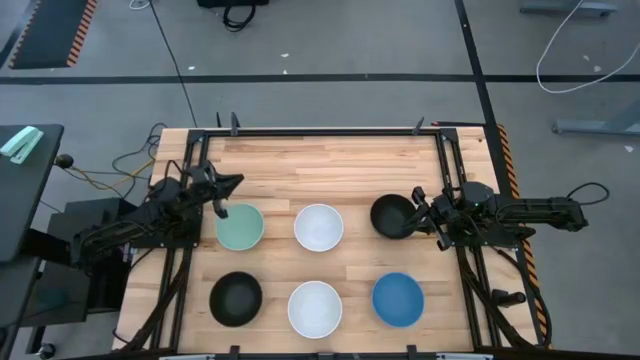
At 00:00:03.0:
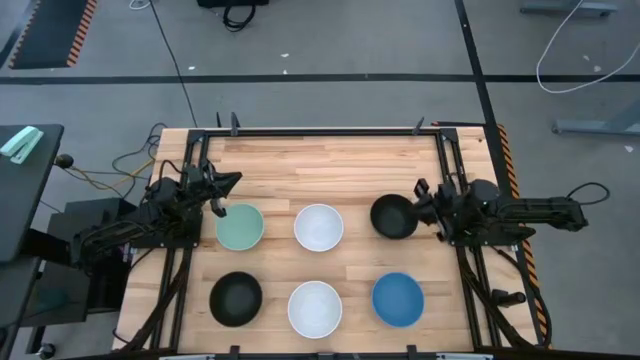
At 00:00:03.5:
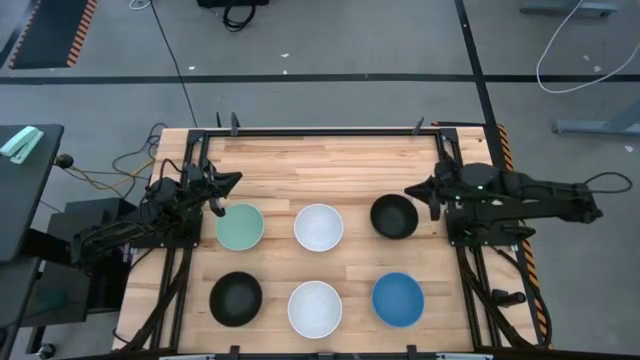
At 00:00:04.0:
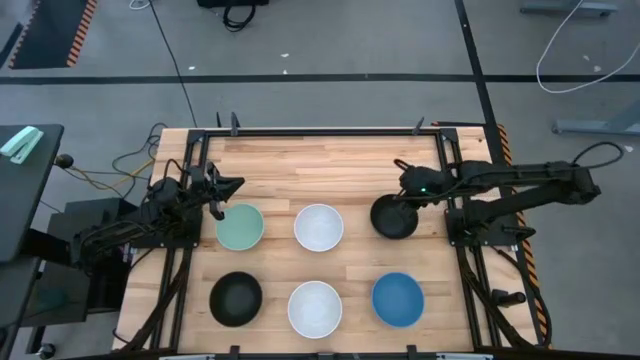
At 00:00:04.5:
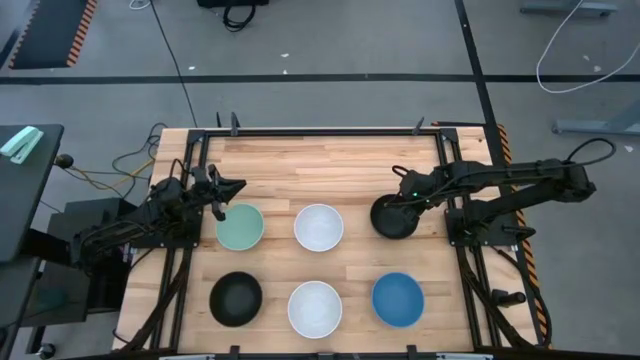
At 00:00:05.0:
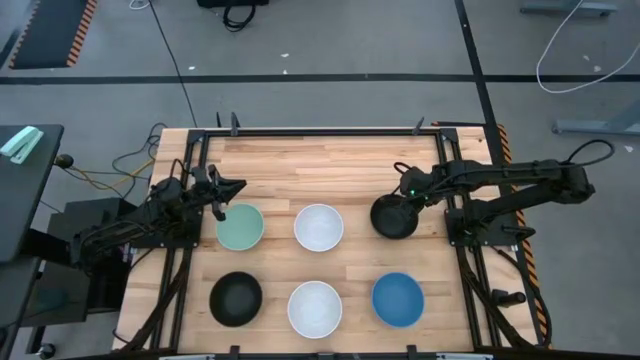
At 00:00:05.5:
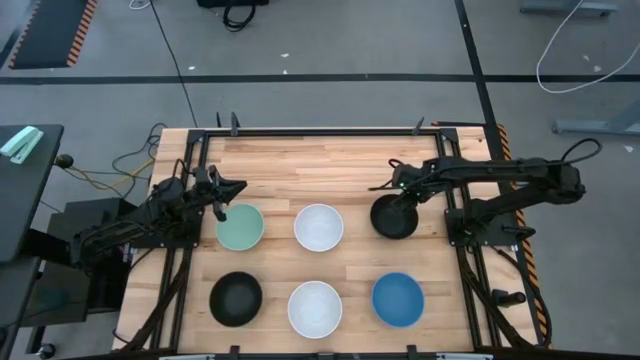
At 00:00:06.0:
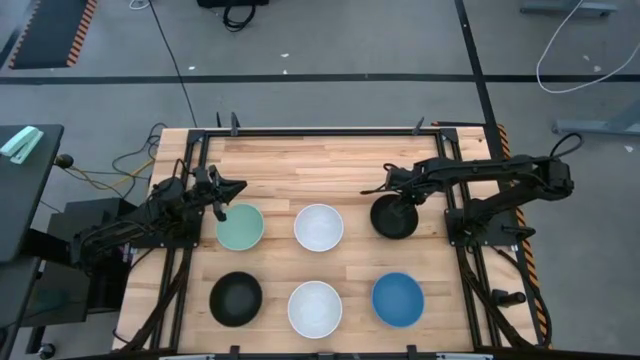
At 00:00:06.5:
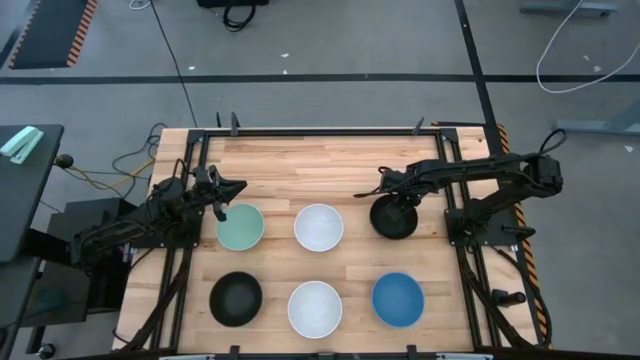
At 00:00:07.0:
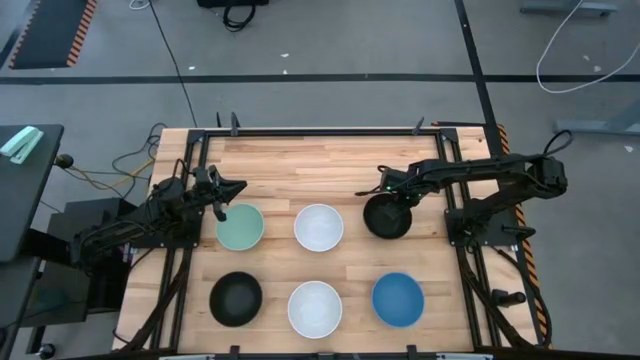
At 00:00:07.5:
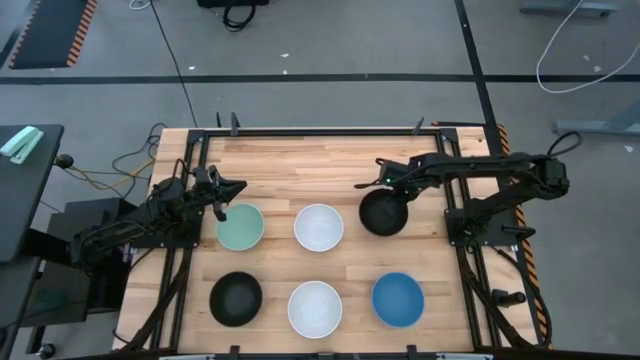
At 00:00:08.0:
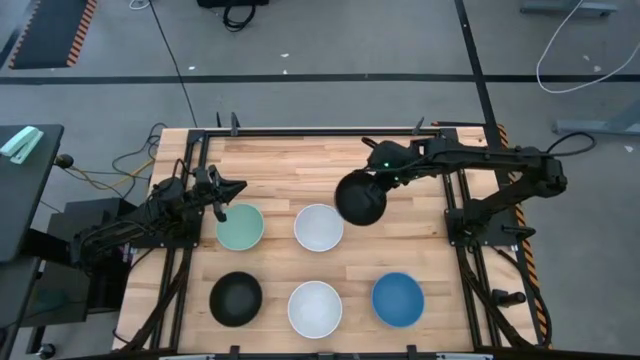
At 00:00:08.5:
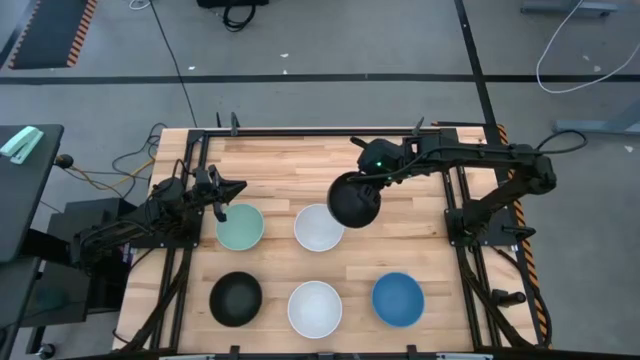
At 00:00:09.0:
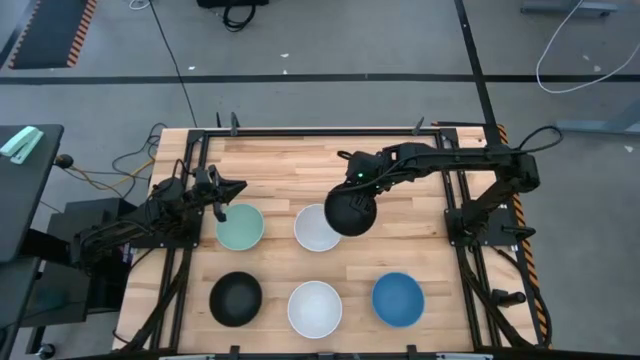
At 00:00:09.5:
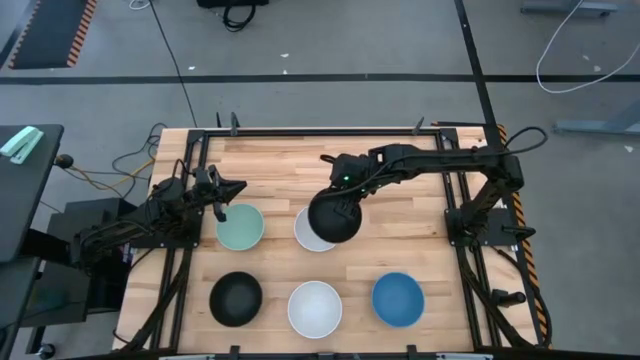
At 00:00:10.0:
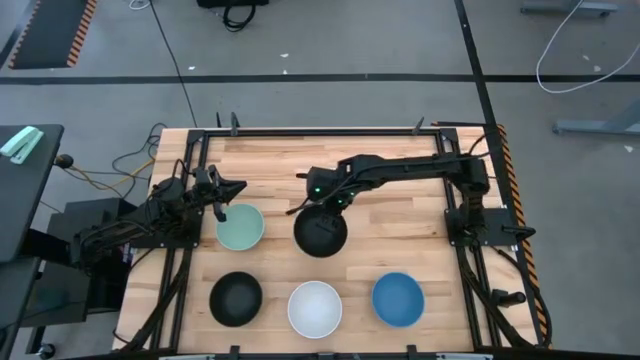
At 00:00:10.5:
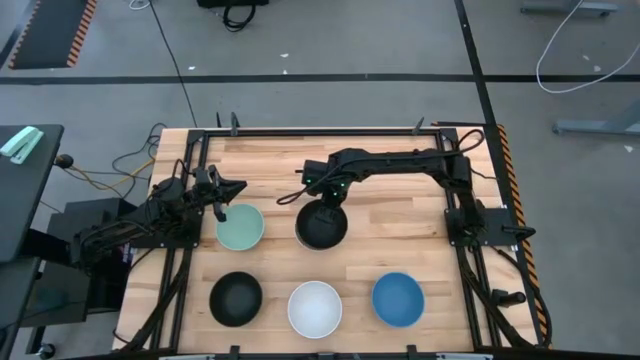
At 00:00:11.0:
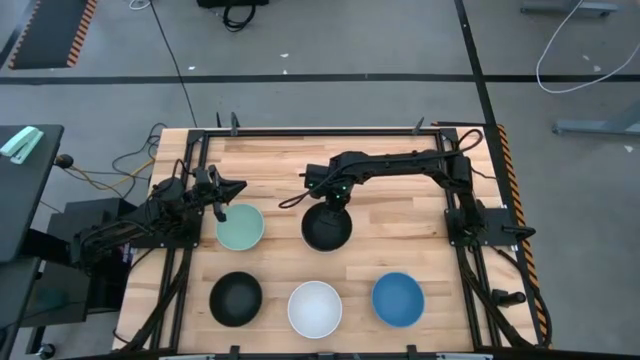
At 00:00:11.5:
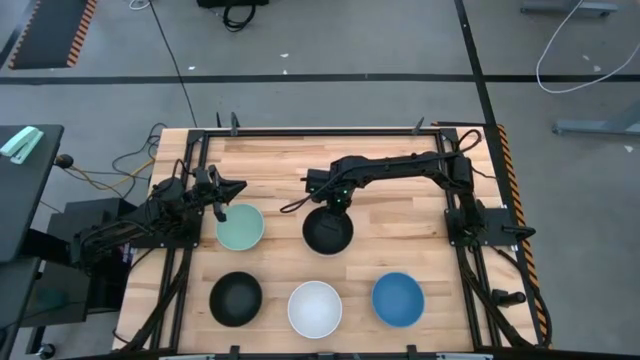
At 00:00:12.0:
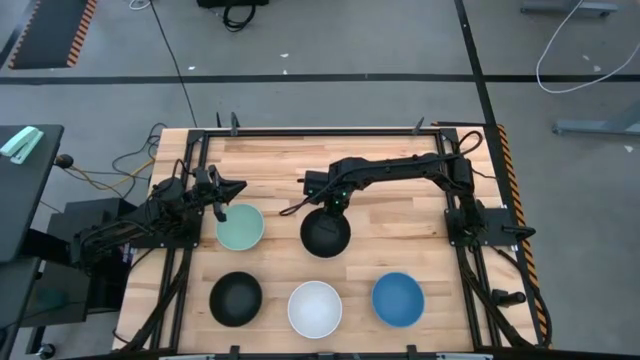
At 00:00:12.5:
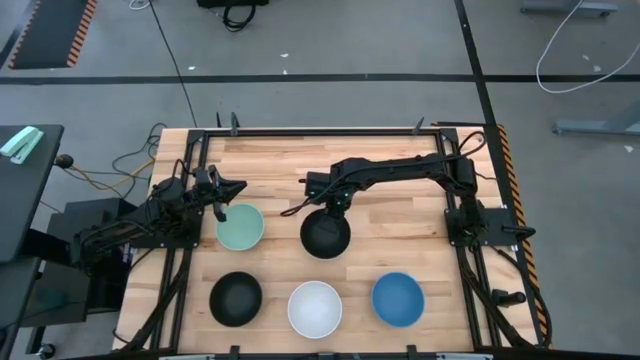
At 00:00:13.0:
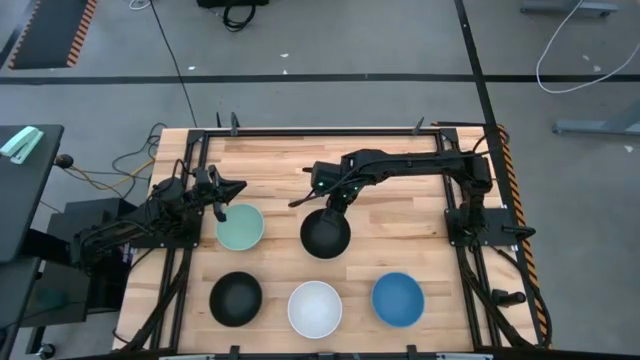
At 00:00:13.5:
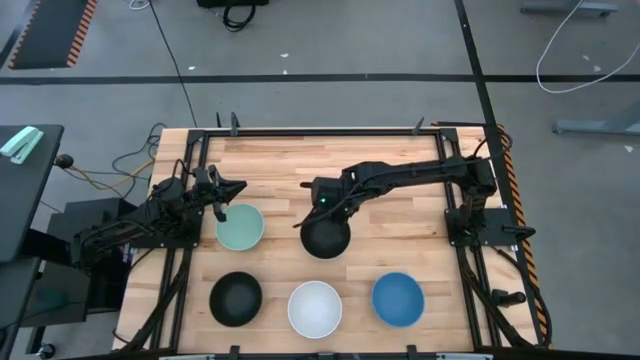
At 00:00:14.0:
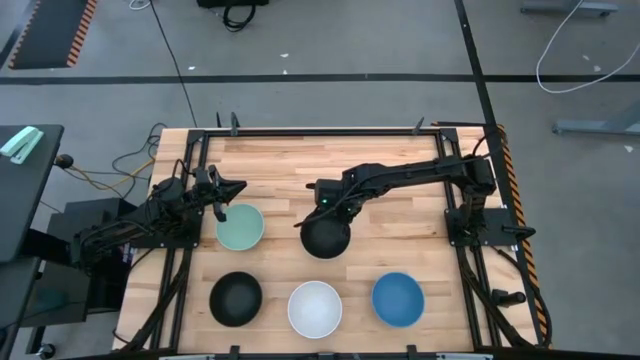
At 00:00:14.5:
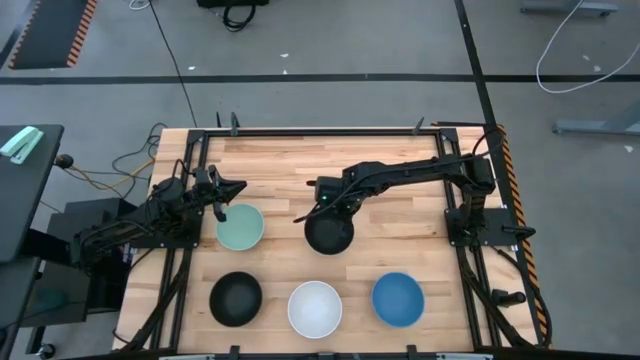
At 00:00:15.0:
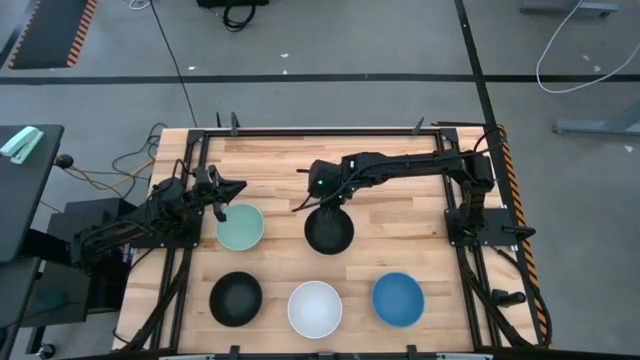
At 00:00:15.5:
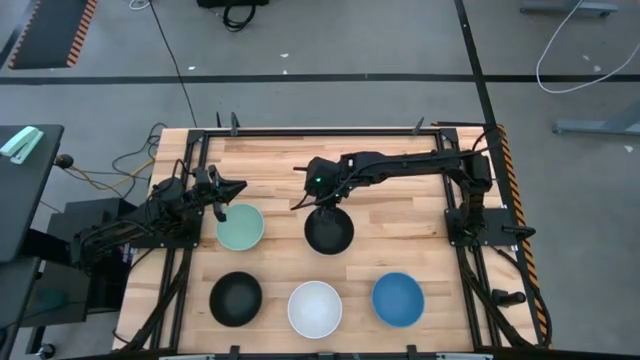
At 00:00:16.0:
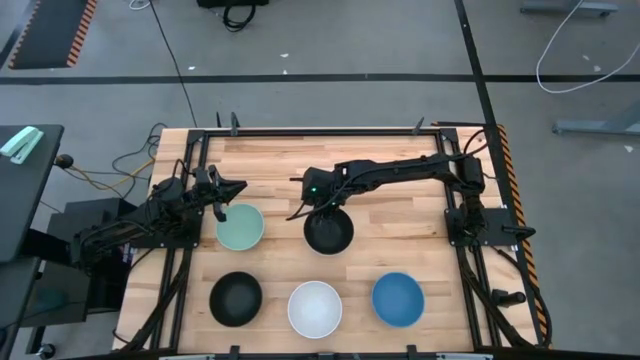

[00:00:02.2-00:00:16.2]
Task: Nest bowls inside each other
Stack the right black bowl on top of the top white bowl

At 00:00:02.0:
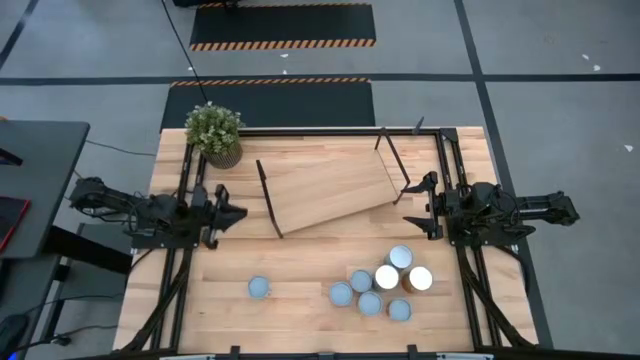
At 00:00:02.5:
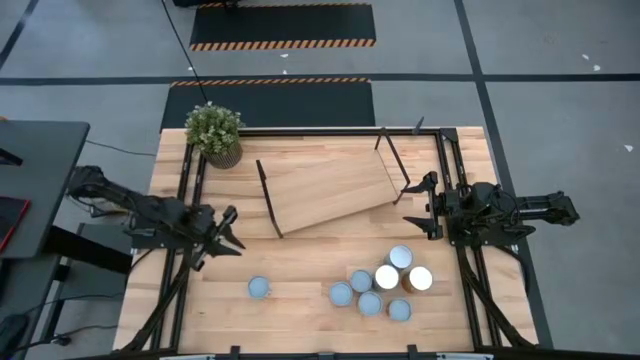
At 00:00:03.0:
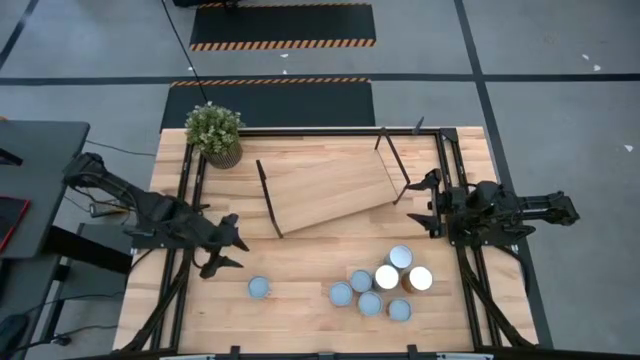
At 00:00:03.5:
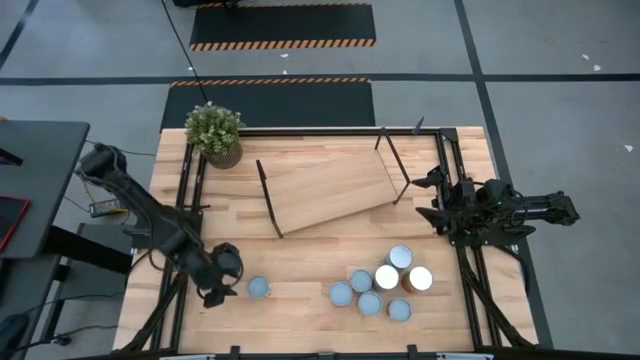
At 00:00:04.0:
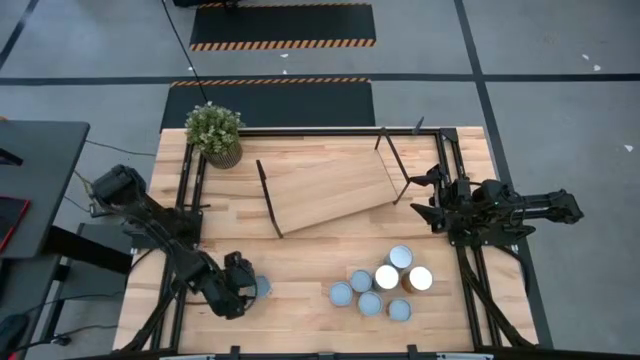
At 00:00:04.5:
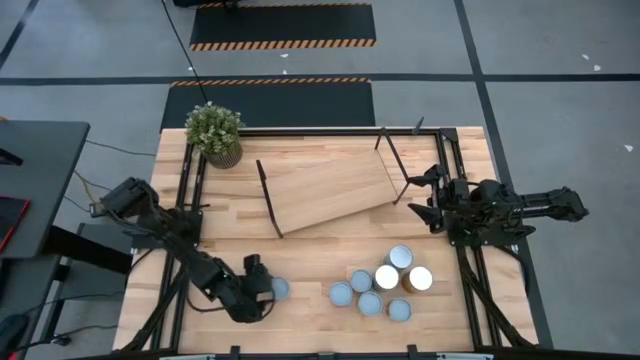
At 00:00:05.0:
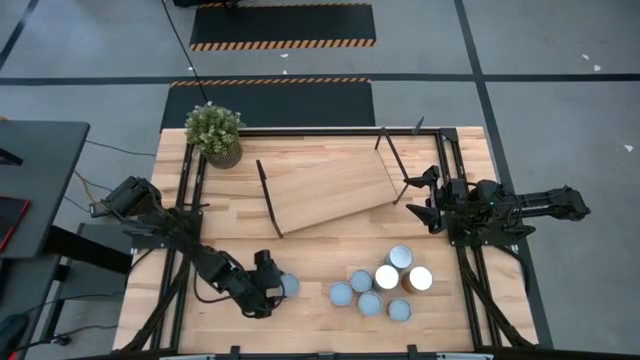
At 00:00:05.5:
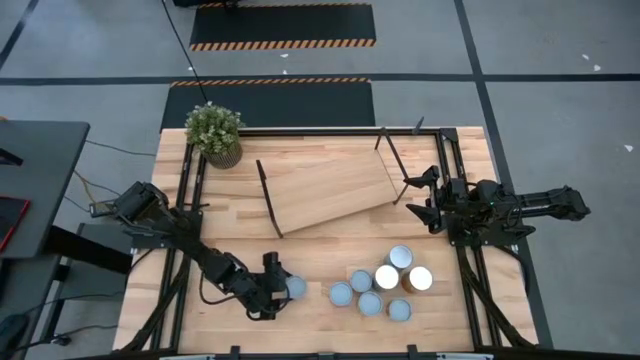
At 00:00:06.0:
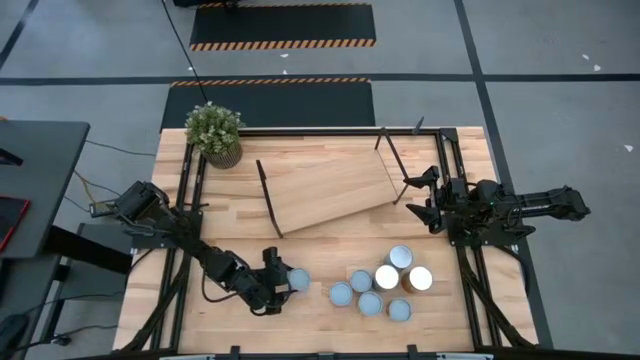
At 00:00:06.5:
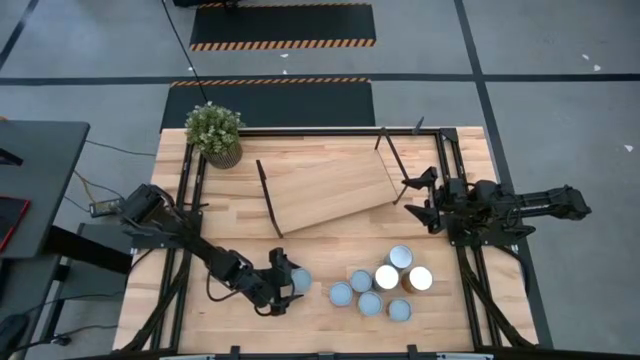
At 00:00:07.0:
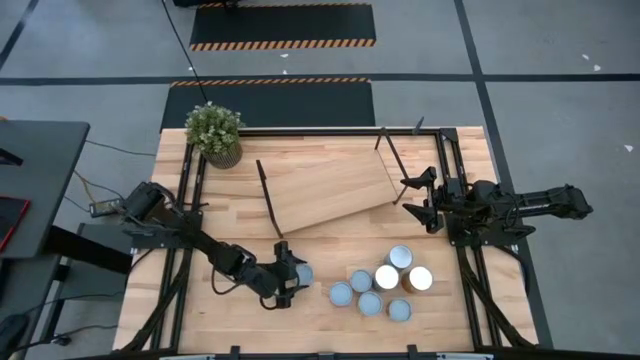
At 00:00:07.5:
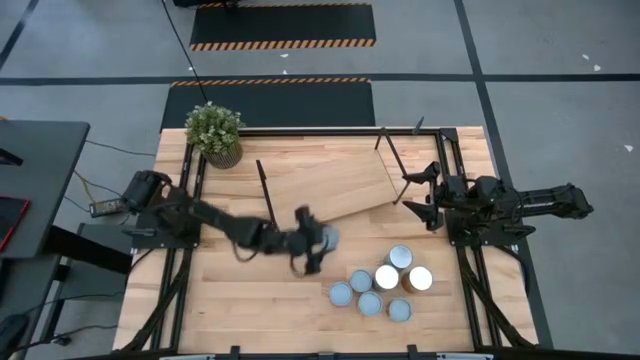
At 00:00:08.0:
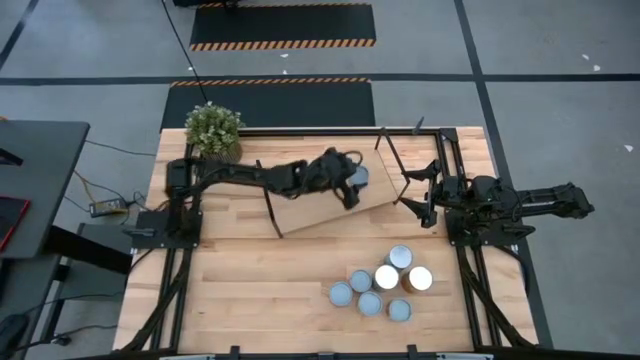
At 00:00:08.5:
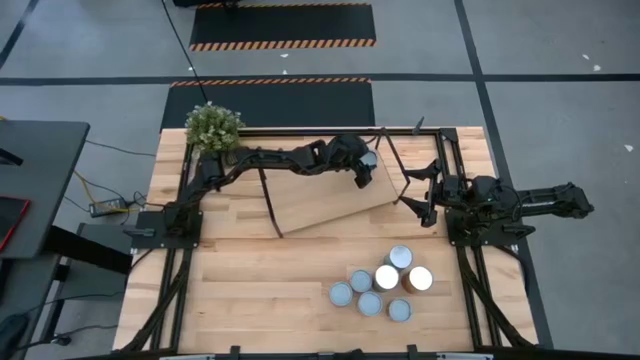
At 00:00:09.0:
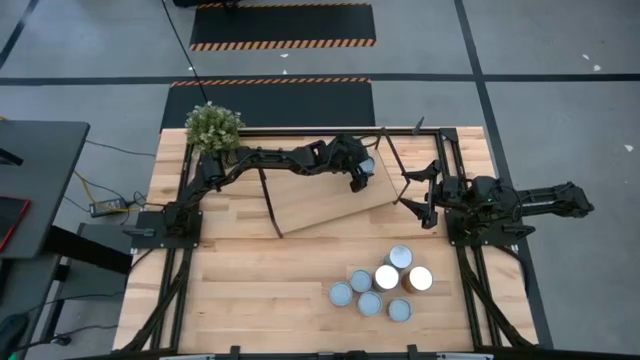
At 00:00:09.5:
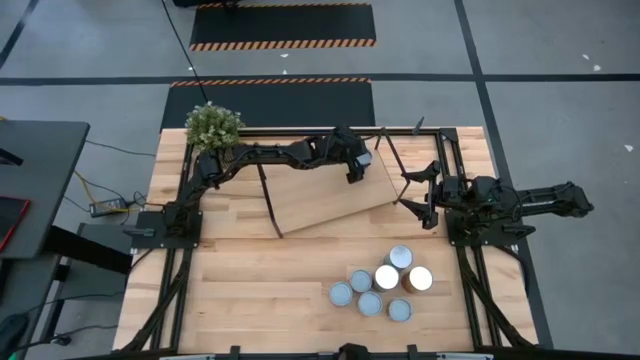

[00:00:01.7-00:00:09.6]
Task: Pick and place cans onto a shelf
Put the white can on the shelf
